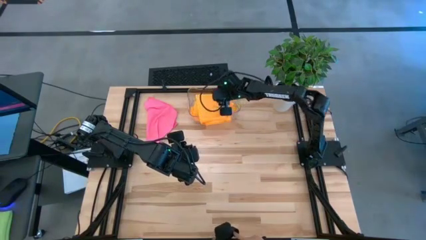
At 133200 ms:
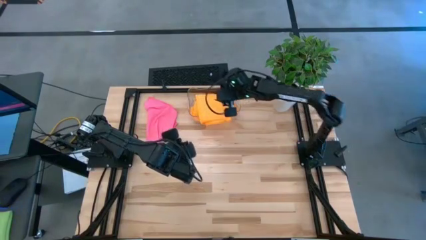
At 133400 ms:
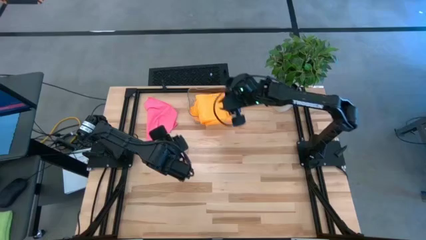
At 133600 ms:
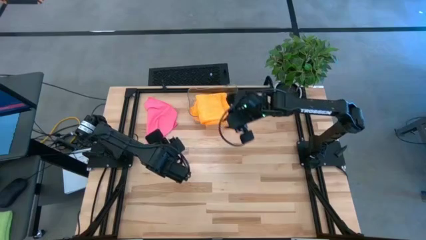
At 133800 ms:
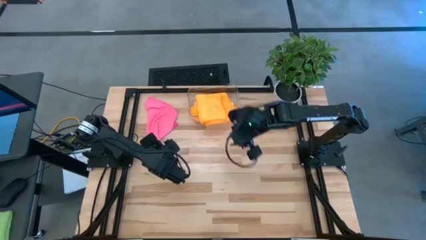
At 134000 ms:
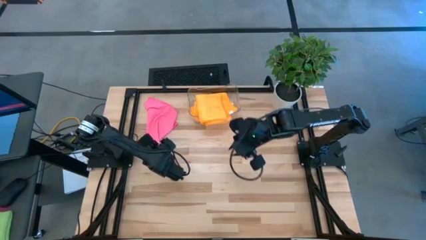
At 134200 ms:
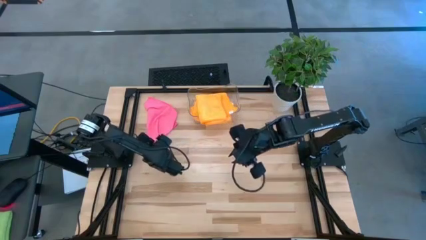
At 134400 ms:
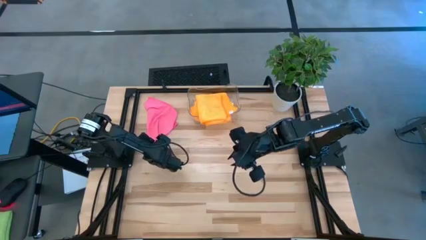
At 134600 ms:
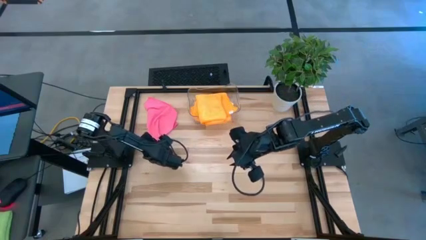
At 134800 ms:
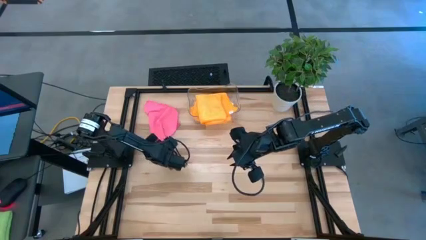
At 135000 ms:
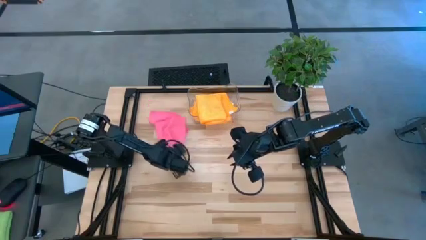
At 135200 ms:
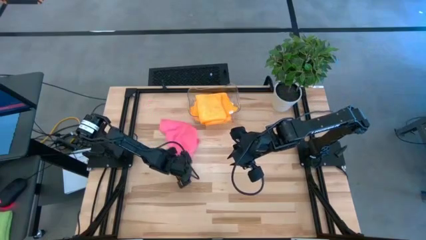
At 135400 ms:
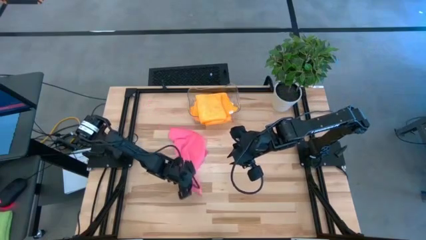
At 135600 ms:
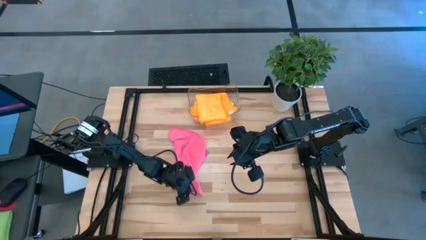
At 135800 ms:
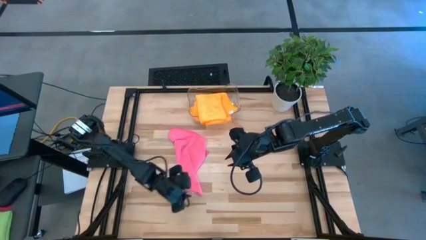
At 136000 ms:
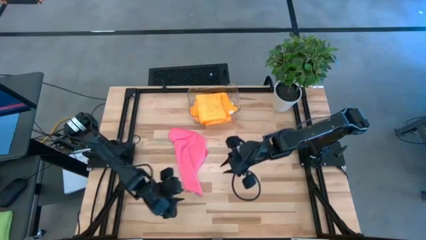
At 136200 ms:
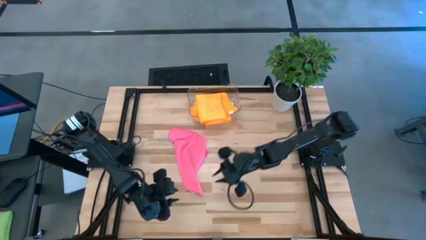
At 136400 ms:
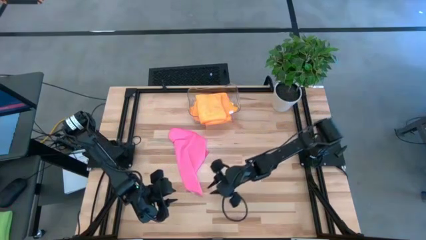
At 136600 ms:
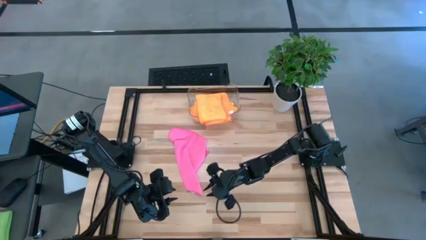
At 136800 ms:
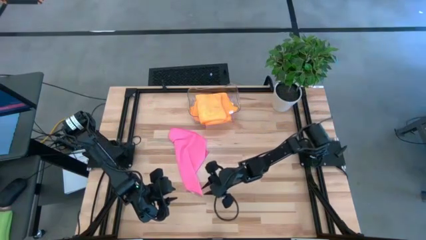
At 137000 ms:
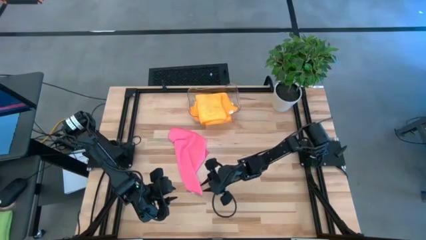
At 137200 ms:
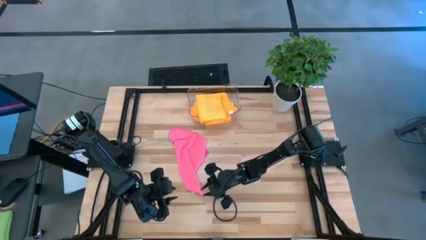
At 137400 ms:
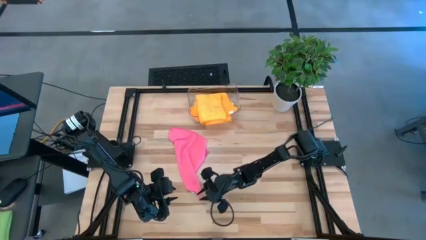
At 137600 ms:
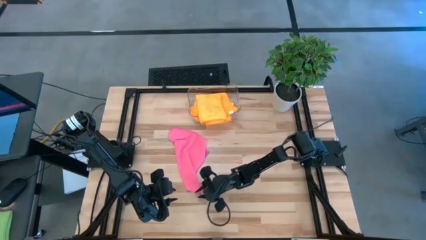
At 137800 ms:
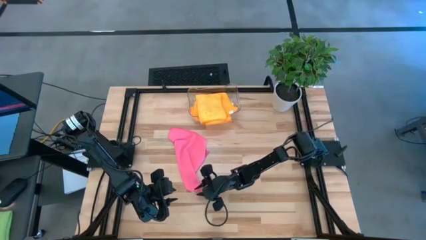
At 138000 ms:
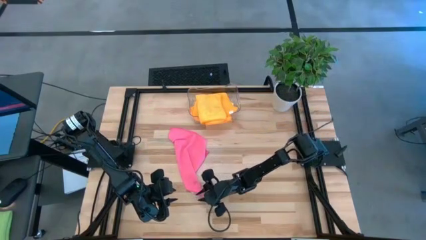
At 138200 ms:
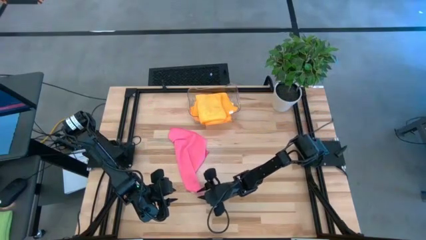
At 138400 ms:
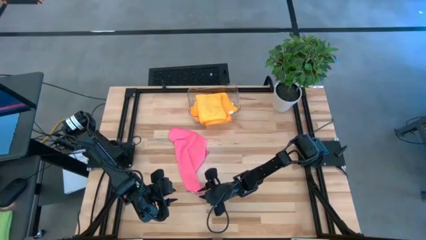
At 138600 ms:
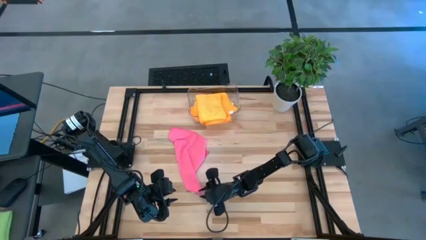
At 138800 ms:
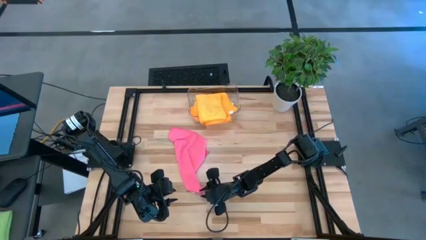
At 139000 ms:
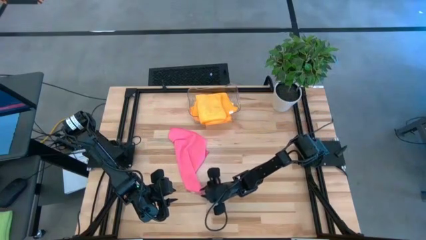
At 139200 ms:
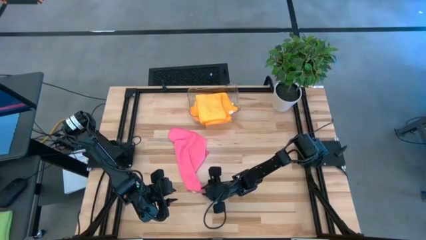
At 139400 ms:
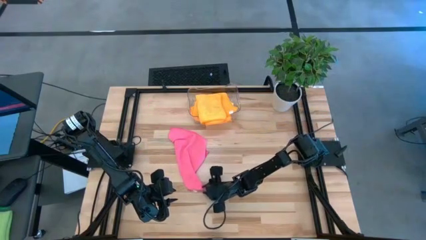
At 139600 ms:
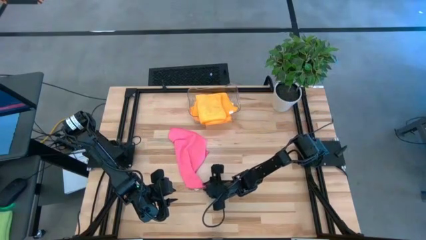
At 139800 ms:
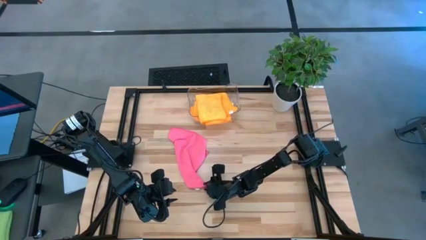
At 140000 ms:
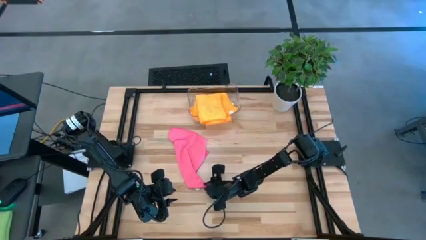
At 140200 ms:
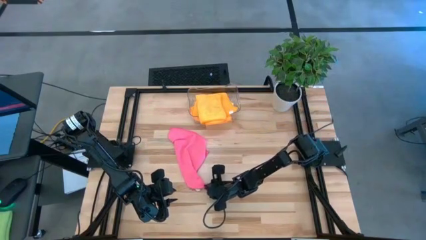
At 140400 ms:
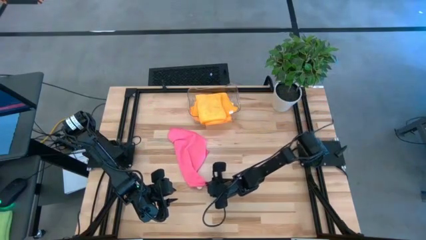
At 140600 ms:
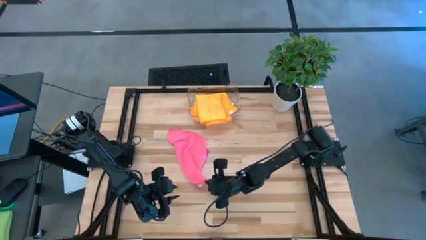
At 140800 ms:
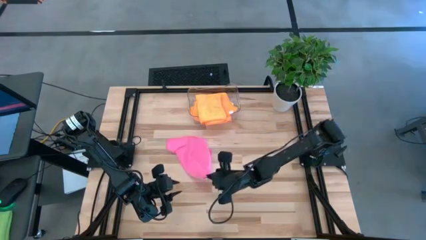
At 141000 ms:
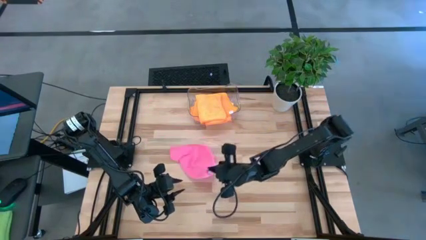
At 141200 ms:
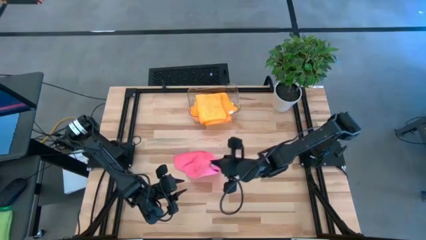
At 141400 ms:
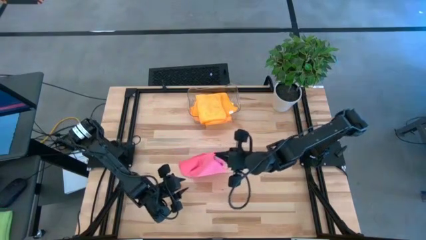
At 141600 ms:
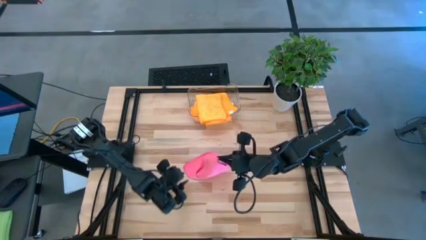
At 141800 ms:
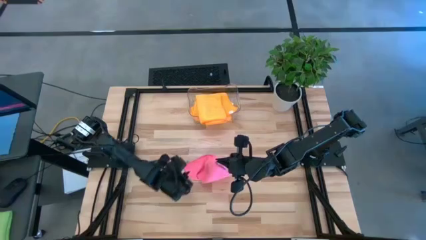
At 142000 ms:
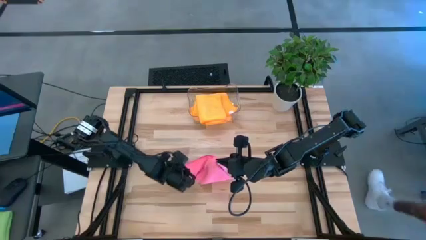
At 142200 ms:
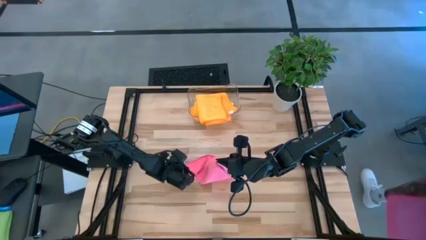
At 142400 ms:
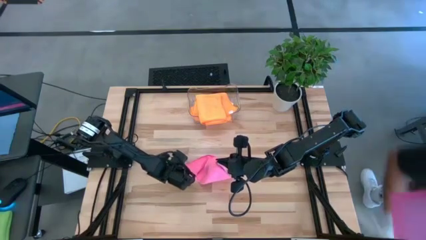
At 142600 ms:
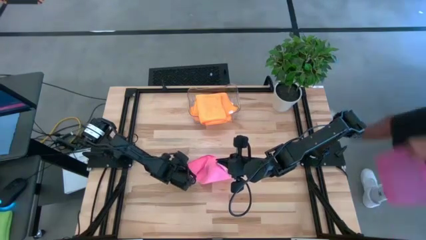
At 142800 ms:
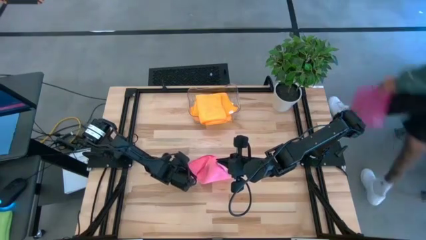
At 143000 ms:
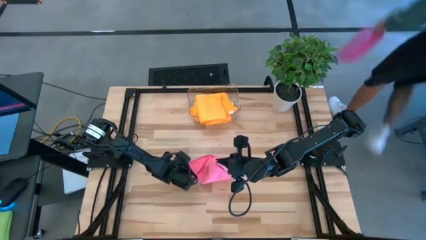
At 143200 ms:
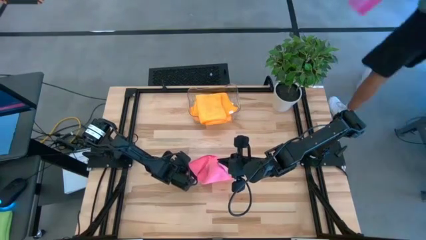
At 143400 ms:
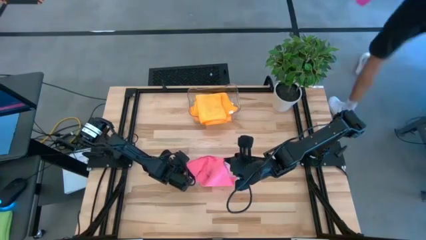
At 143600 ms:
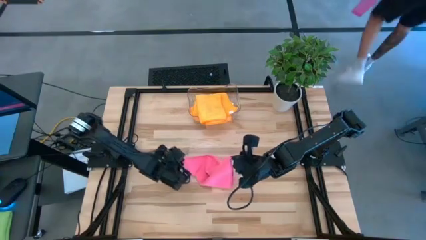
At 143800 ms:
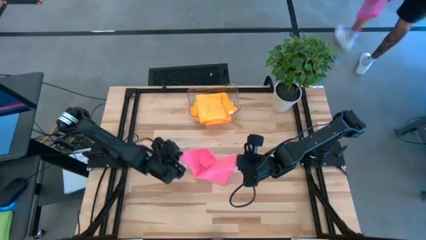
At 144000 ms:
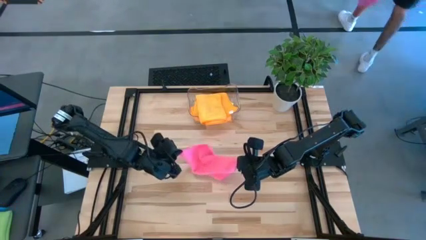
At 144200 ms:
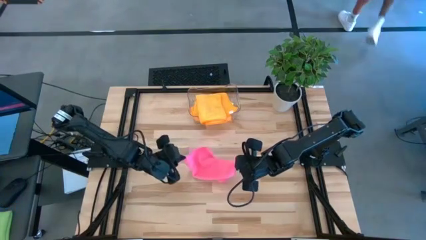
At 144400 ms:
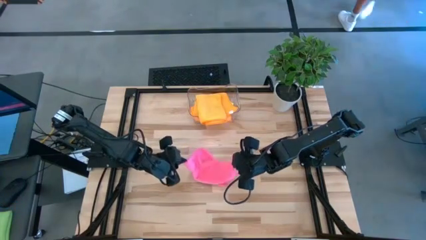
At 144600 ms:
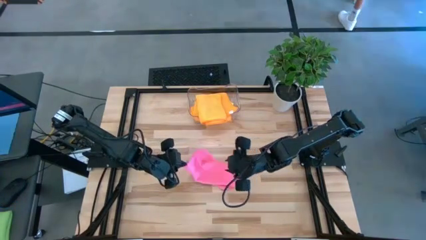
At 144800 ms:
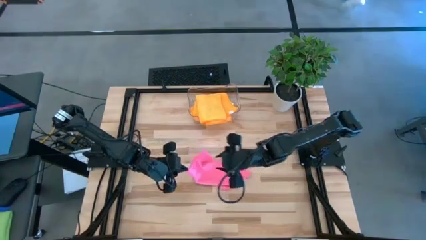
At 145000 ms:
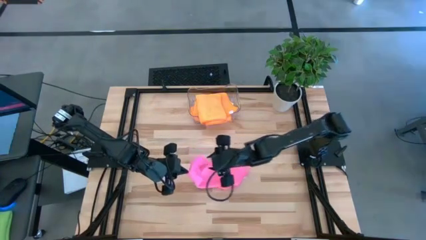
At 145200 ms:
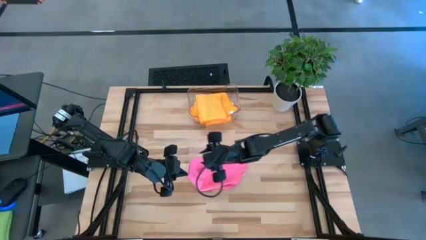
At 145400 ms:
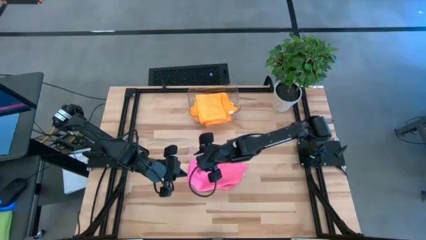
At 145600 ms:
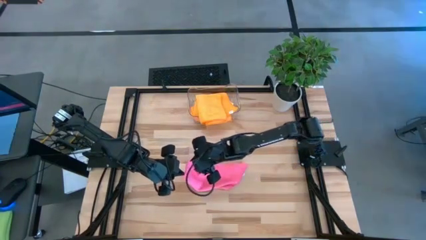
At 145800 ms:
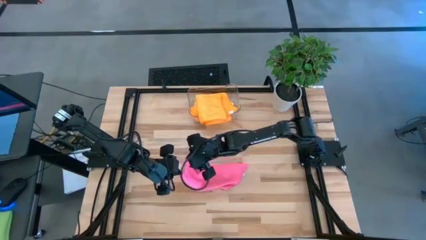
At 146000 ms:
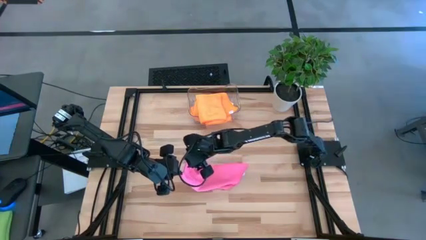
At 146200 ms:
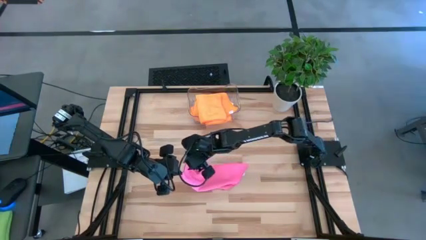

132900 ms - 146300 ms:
Task: Fold microfiber towels
Fold the pink towel

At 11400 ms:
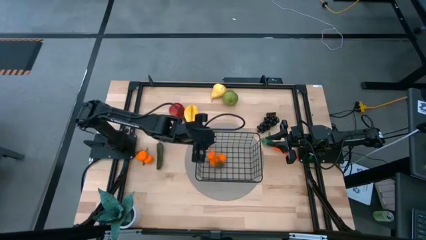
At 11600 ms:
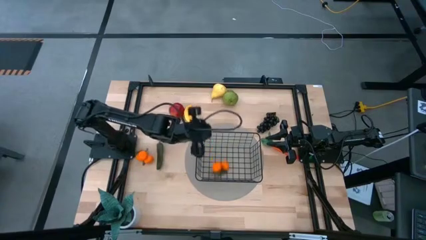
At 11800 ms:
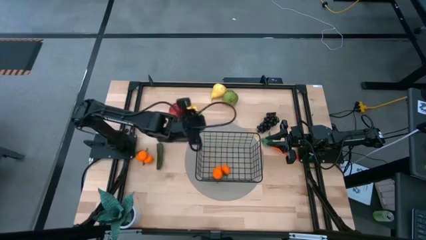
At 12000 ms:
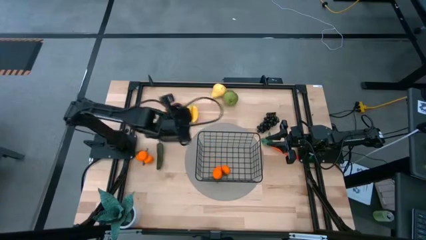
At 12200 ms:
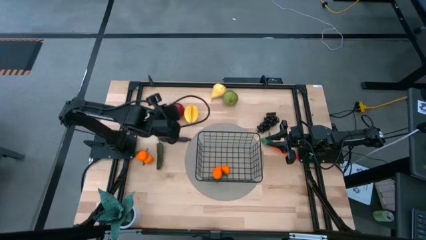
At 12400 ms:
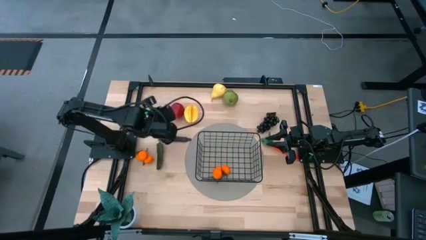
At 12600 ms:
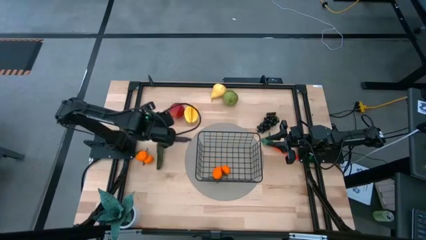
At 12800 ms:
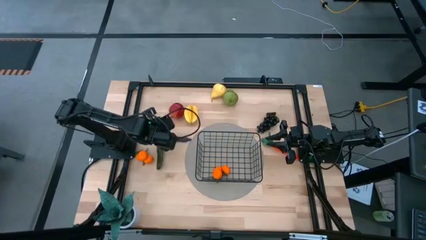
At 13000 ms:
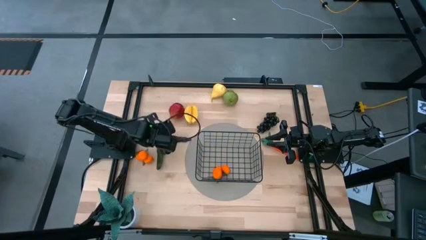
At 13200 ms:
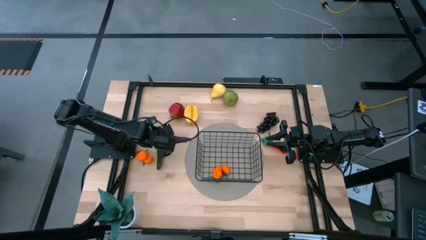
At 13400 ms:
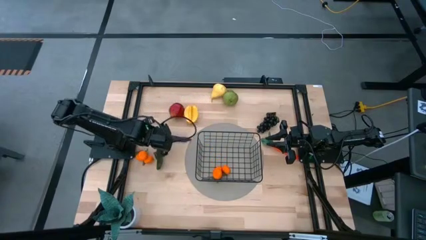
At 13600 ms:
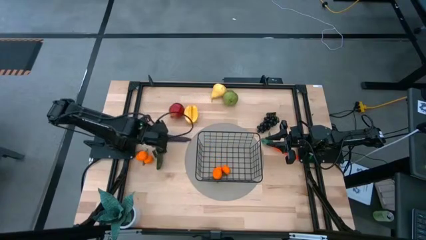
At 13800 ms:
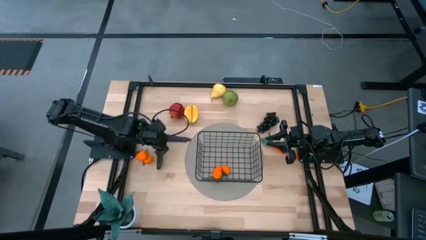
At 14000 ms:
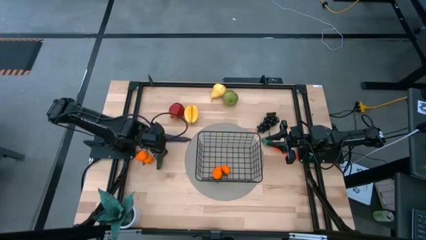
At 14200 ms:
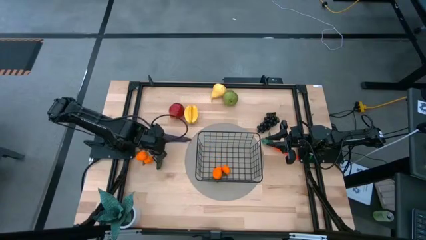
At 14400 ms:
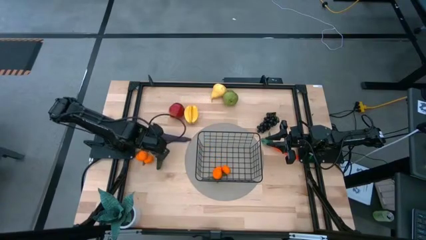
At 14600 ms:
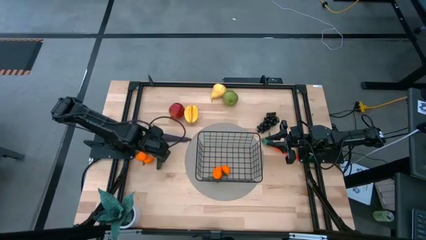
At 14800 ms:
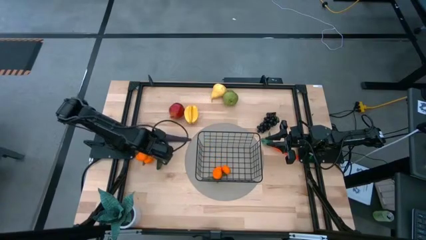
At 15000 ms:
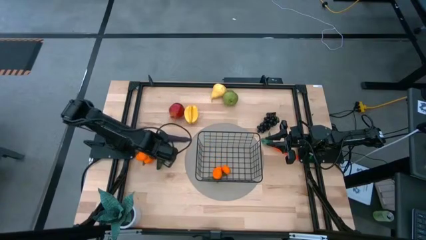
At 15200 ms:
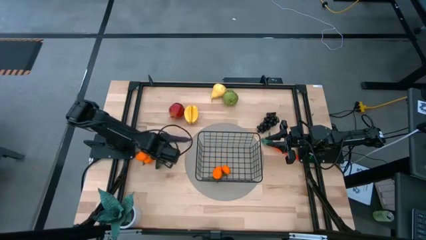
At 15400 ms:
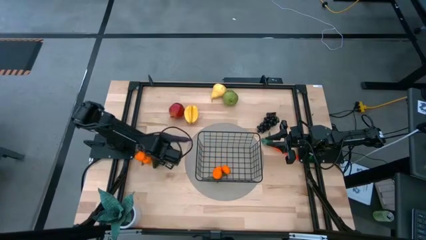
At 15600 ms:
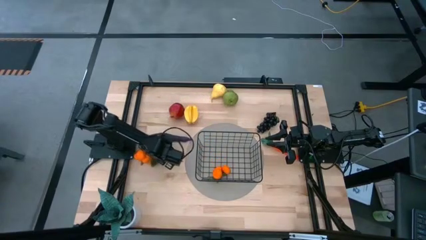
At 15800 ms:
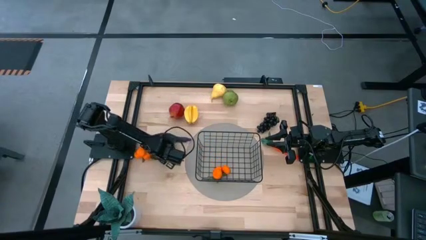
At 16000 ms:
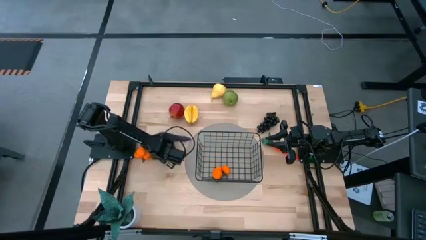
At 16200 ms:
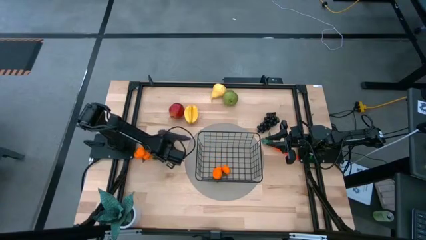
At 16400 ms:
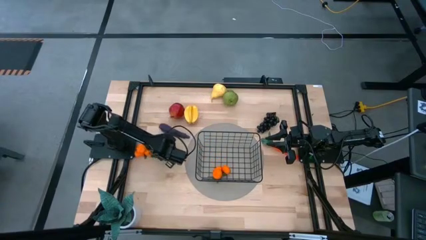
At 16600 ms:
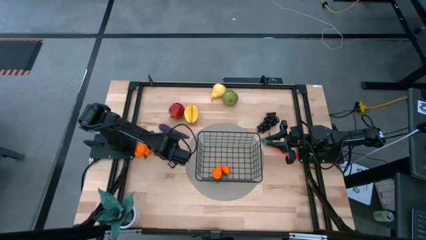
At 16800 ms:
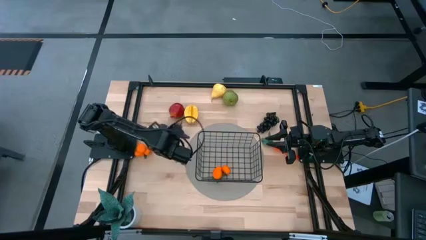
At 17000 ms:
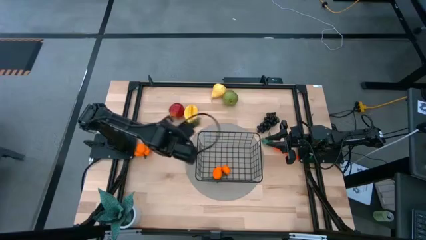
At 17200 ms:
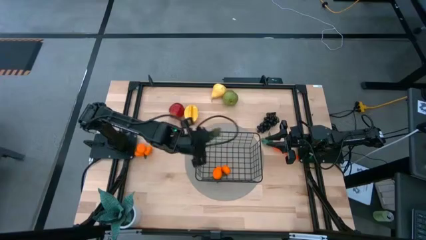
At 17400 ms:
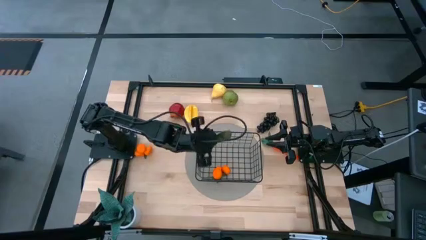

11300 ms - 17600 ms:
Task: Build produce basket
Put the green chili pepper into the wire basket
